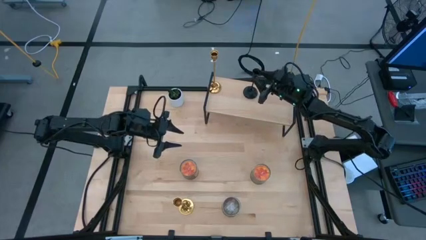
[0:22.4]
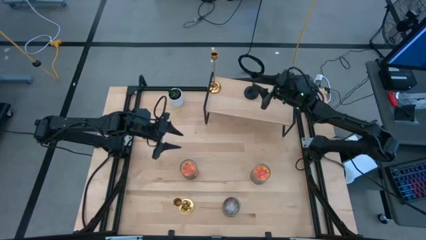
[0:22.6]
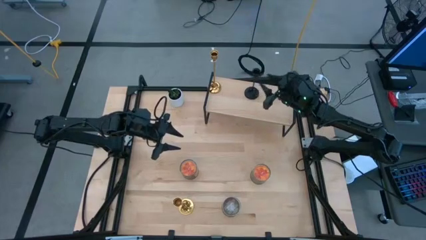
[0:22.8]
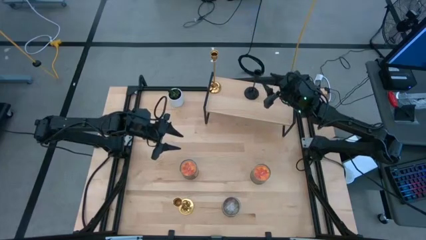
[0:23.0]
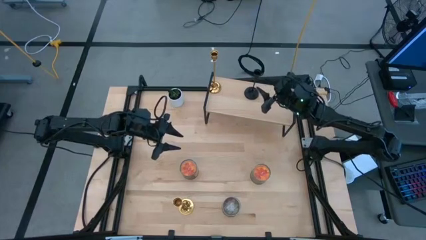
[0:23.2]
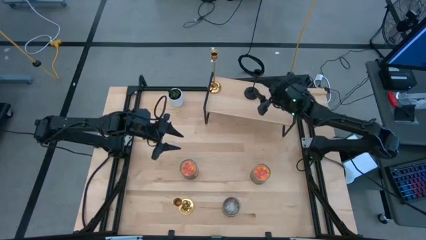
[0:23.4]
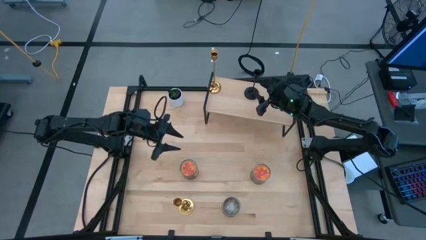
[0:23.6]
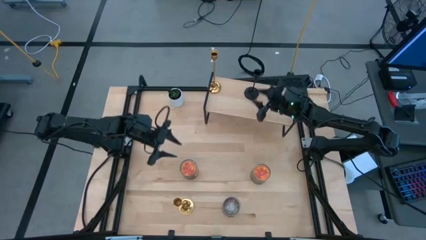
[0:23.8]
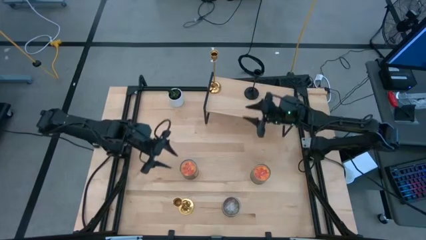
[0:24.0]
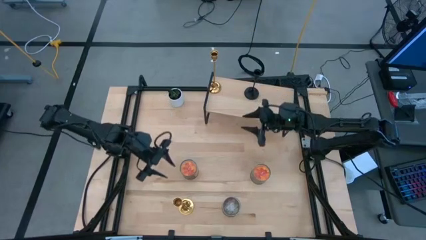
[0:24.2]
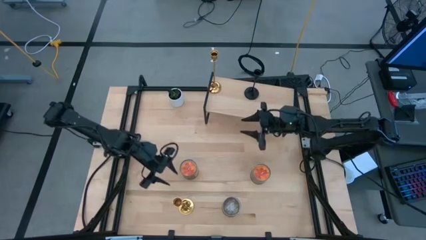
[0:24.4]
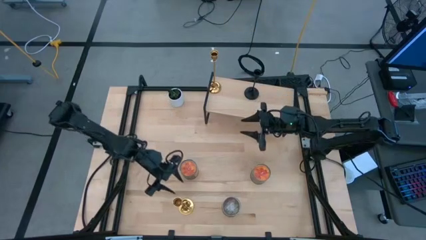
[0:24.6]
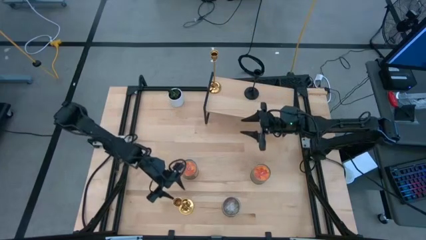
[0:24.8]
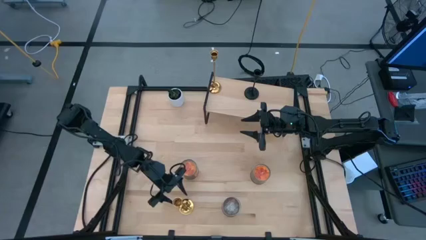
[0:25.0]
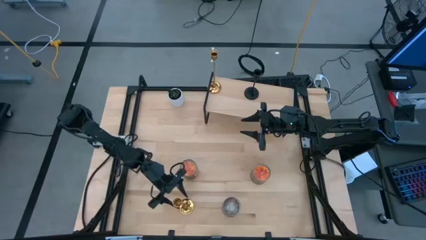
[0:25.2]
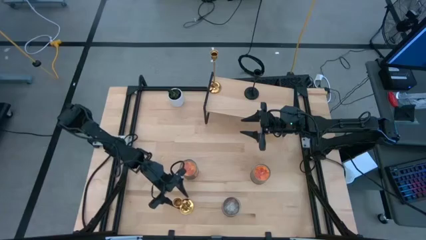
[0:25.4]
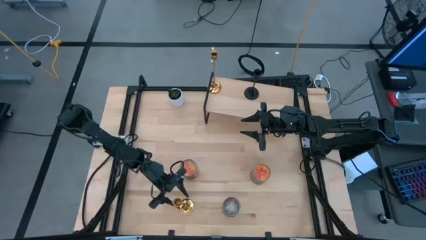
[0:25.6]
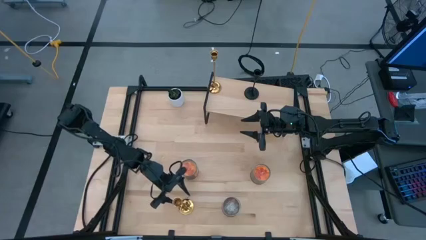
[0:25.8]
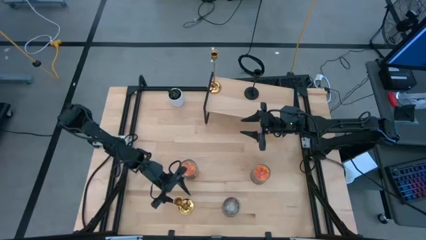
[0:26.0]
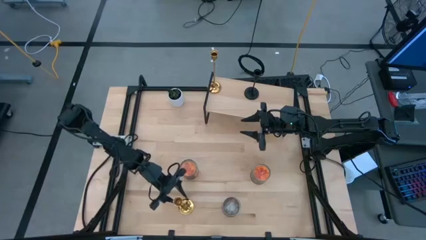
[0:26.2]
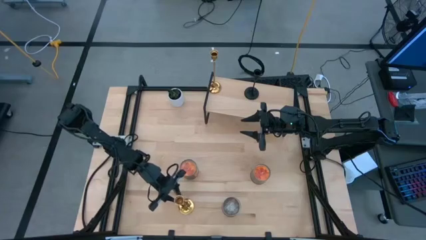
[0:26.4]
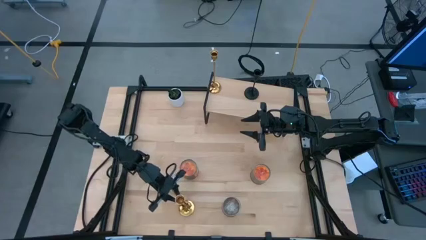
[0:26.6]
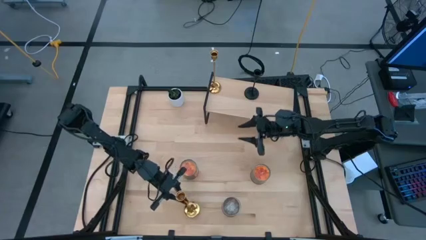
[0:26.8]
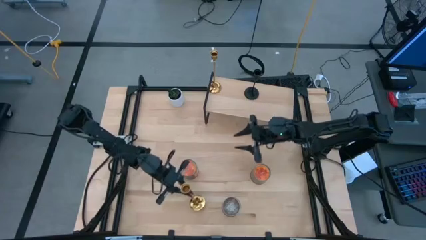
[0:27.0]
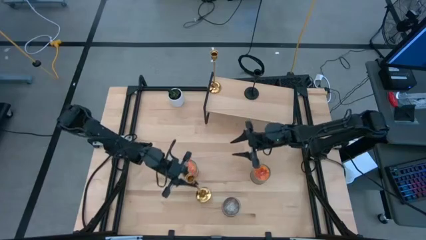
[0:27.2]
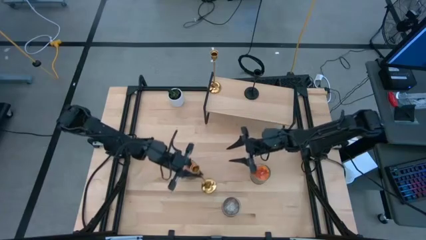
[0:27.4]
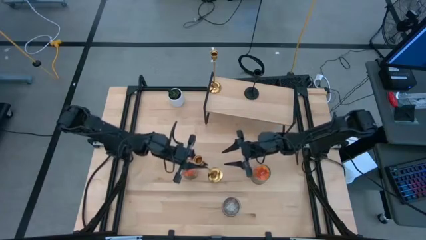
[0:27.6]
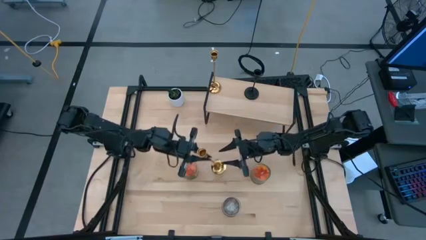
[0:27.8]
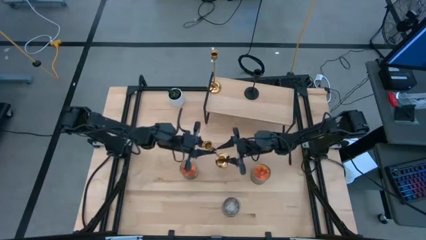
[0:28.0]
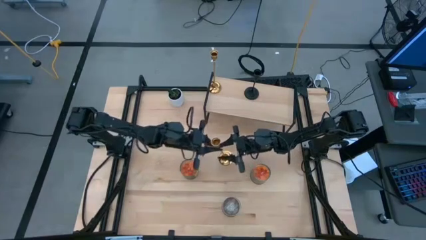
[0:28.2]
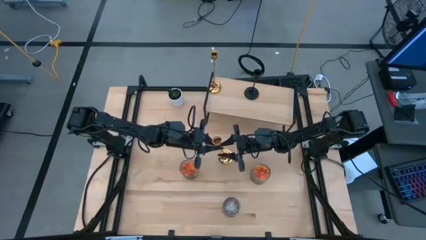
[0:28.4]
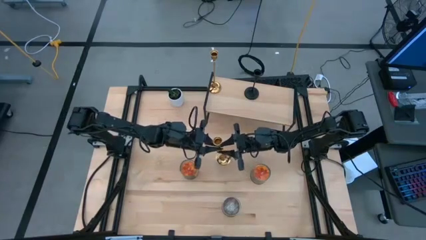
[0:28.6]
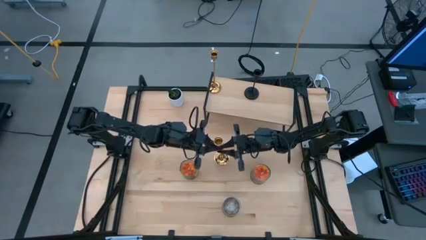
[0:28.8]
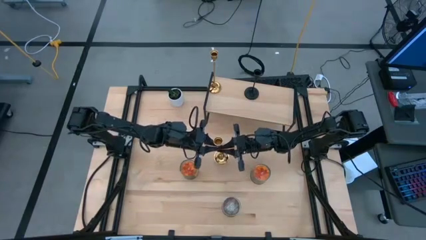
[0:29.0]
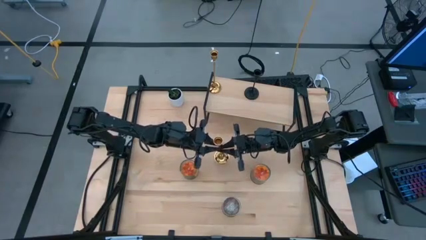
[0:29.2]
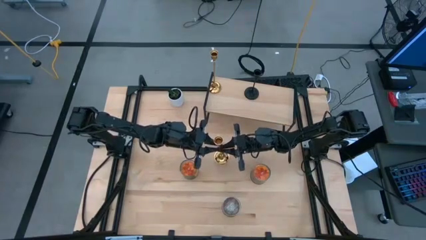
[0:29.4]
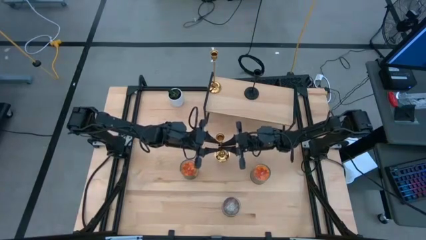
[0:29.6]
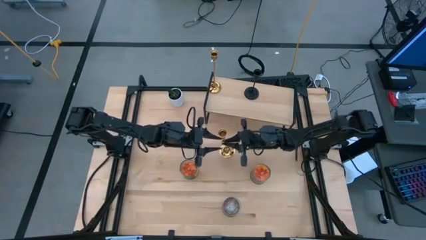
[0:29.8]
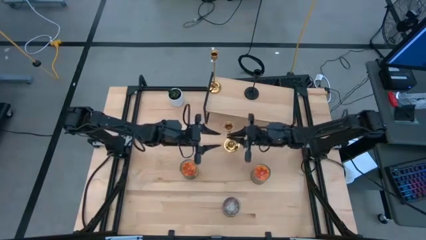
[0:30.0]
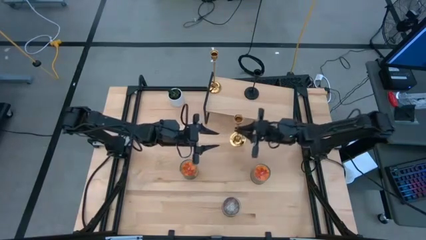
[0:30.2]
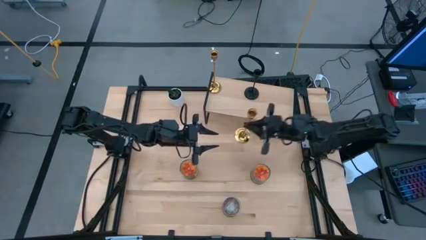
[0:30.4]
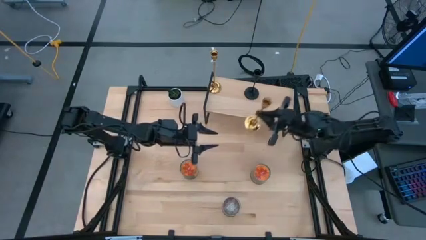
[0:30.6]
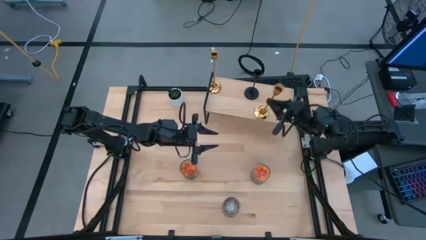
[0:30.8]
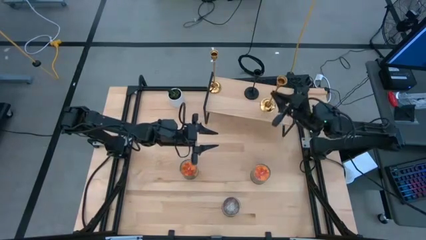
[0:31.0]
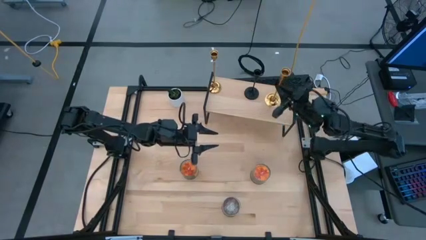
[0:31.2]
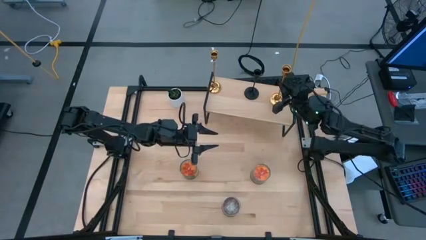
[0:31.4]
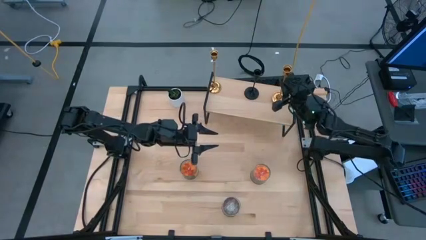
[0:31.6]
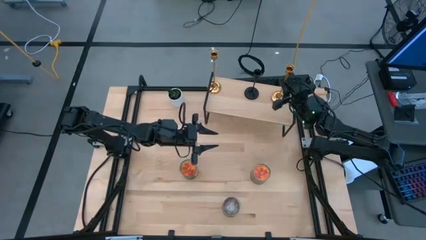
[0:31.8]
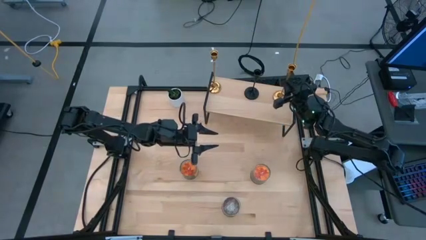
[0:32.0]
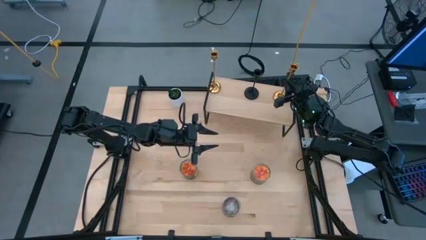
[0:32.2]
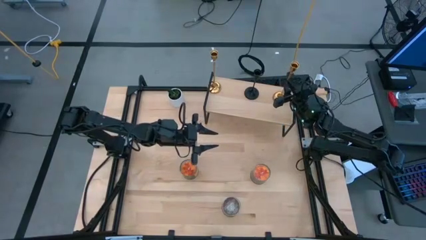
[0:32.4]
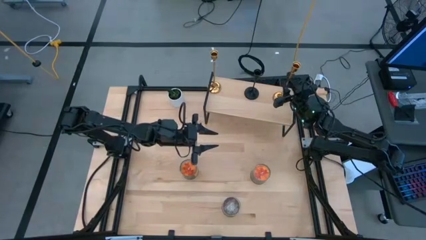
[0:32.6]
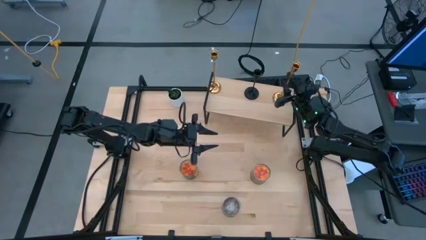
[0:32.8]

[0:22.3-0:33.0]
Task: Pick & Place candle stick holders
Put the golden candle holder on the shelf

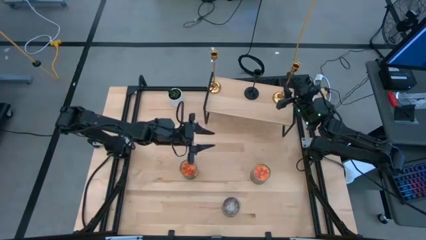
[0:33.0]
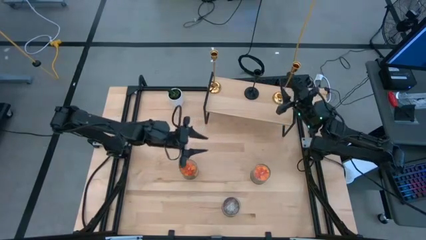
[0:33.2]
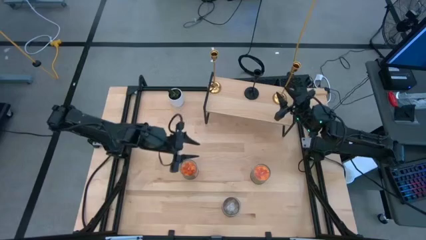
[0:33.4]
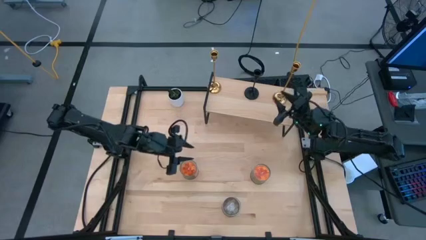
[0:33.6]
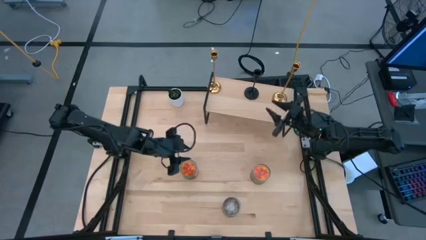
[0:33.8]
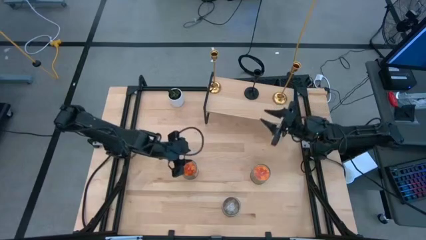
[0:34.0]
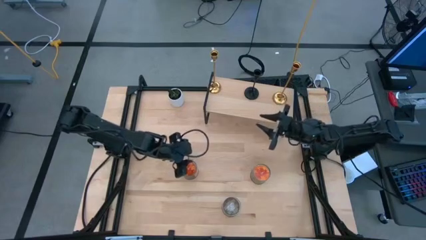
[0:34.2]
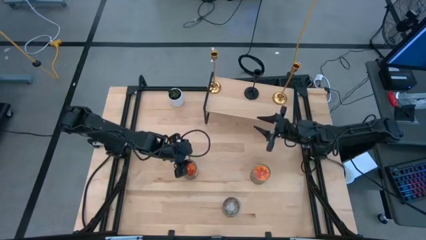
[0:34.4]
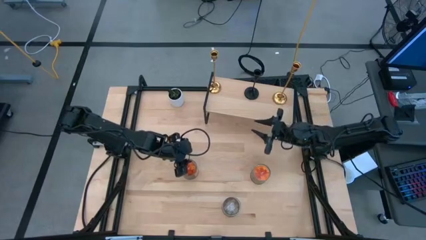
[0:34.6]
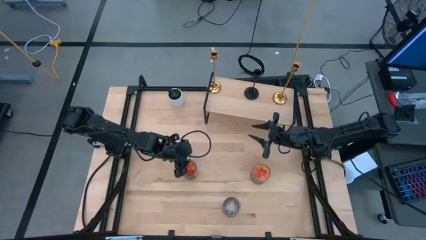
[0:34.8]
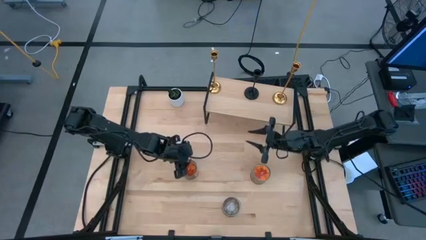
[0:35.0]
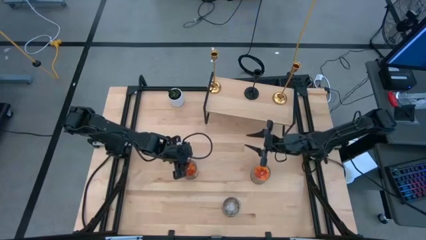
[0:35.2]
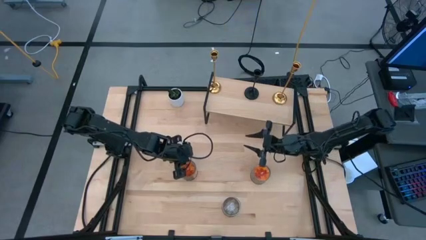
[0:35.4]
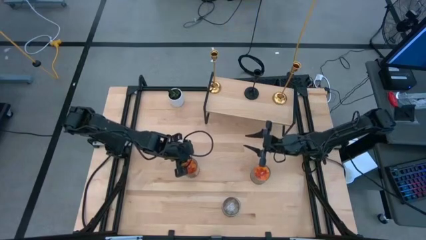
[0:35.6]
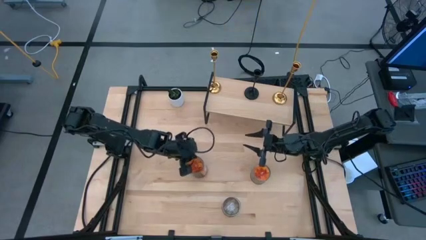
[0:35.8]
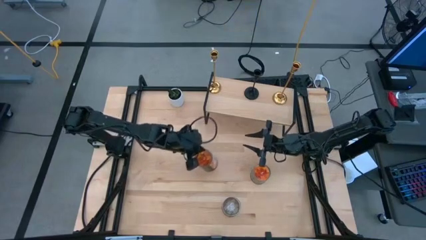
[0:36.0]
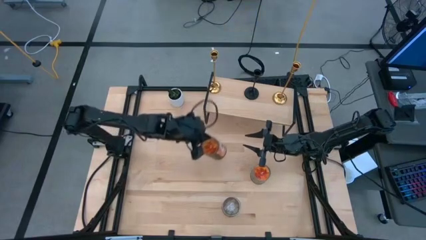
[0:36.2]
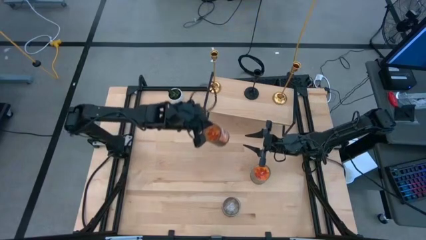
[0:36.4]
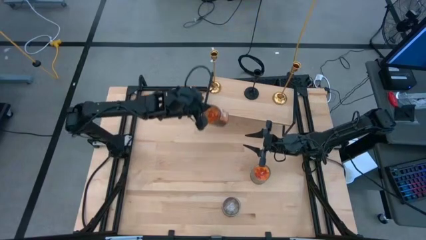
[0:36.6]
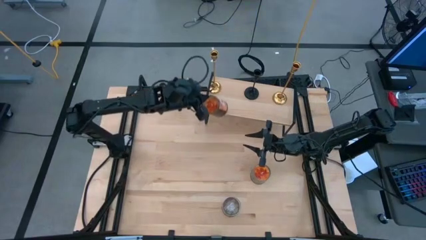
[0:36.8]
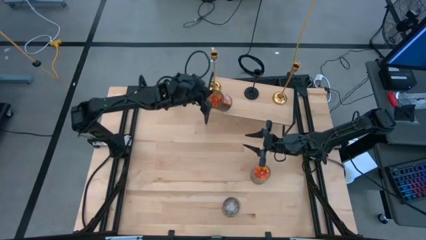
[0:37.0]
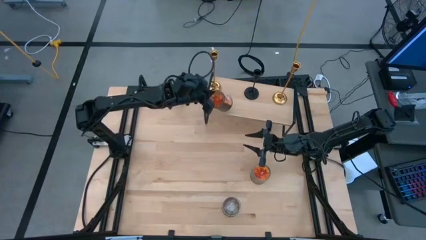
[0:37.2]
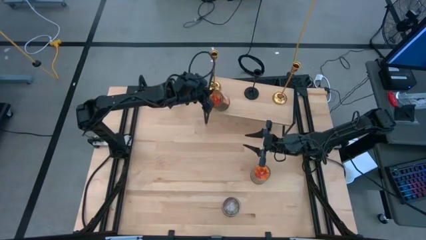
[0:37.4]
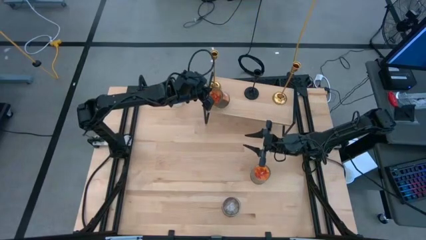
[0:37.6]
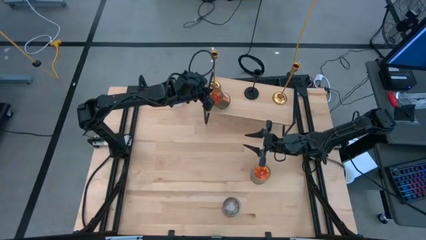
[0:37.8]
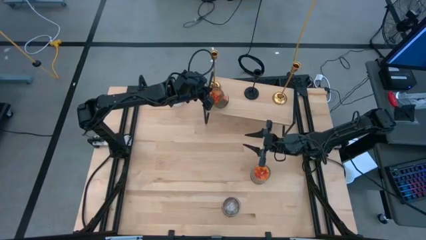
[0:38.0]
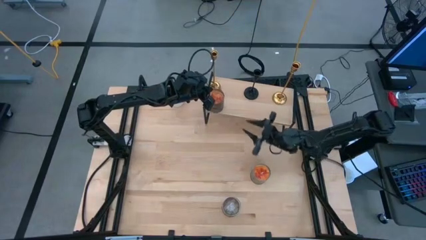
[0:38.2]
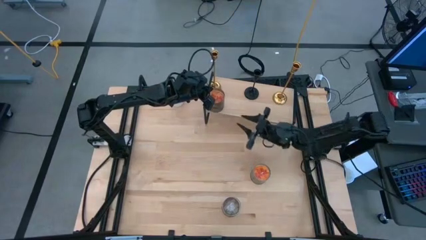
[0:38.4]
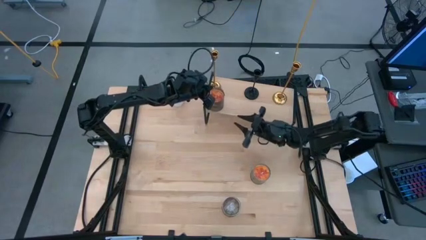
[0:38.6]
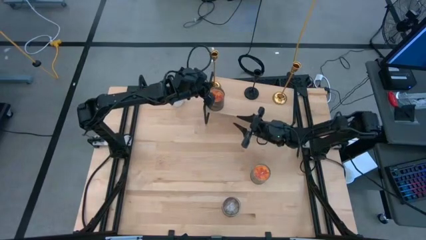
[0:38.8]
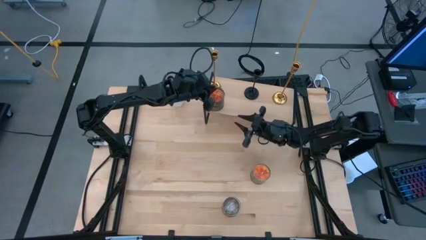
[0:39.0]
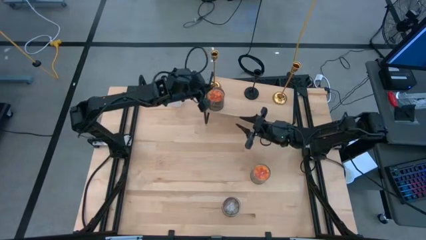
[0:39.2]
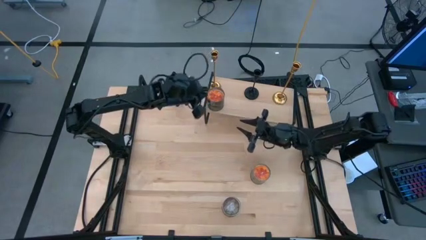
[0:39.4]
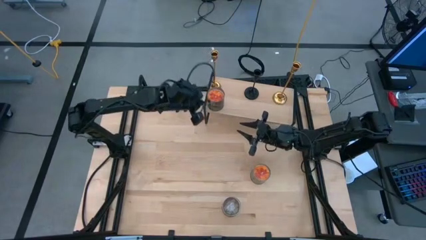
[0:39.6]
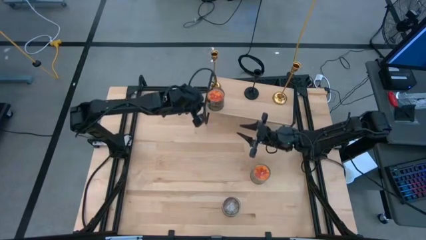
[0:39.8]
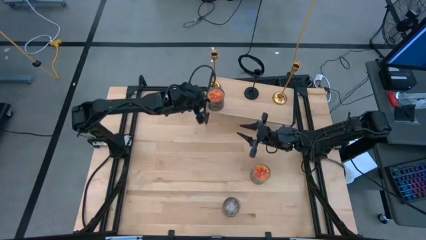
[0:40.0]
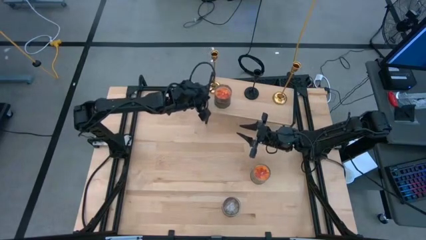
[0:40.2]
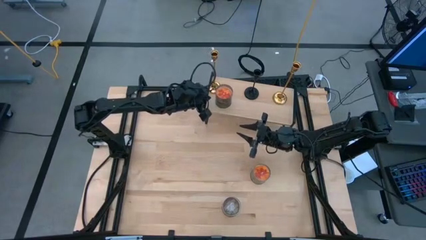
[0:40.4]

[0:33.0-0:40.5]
Put the left orange scented candle on the shelf aligned with the left golden candle holder
